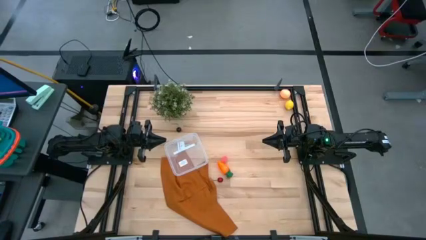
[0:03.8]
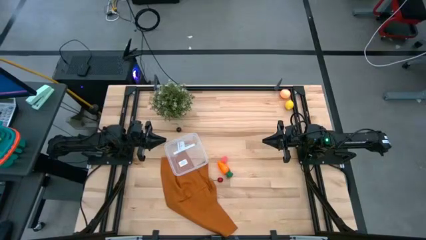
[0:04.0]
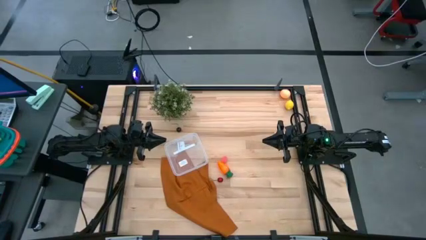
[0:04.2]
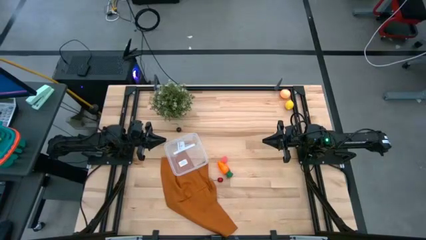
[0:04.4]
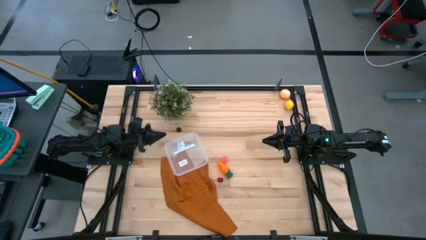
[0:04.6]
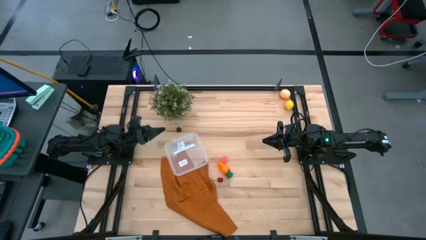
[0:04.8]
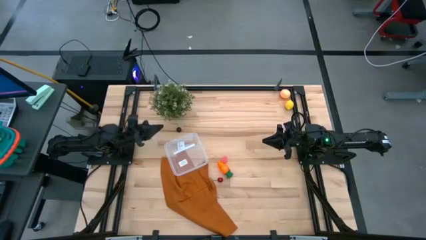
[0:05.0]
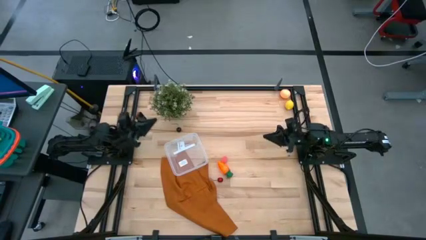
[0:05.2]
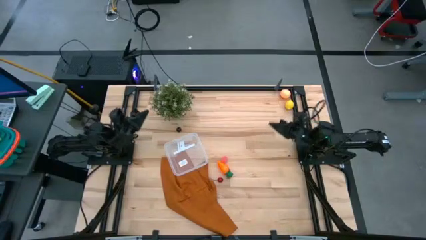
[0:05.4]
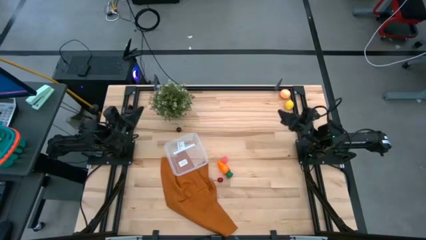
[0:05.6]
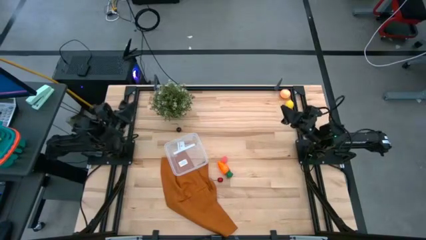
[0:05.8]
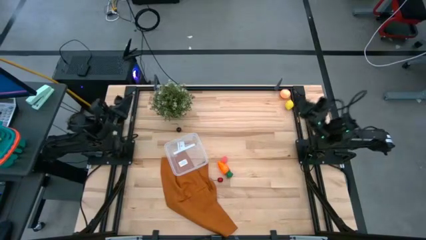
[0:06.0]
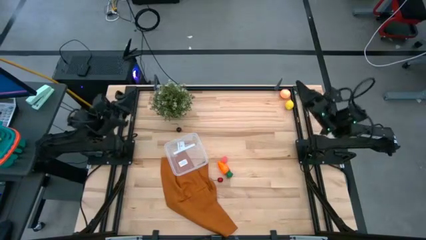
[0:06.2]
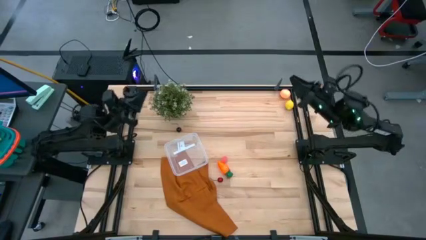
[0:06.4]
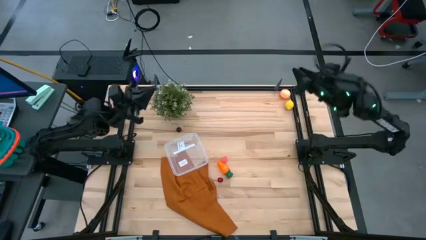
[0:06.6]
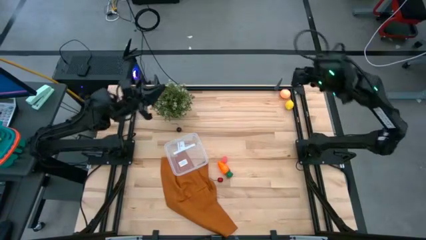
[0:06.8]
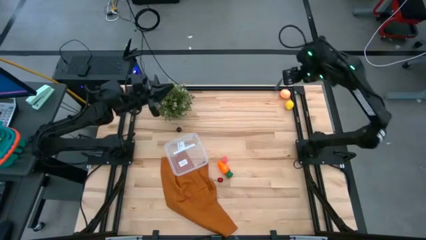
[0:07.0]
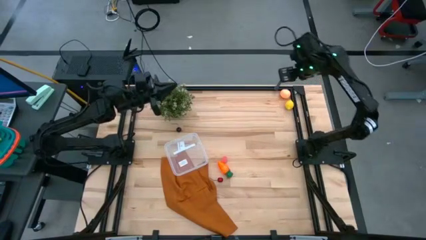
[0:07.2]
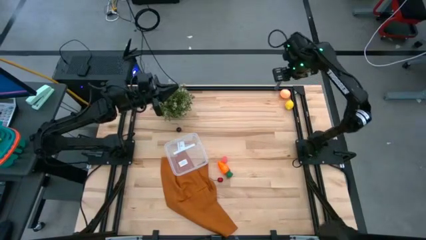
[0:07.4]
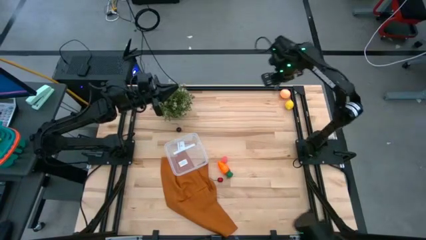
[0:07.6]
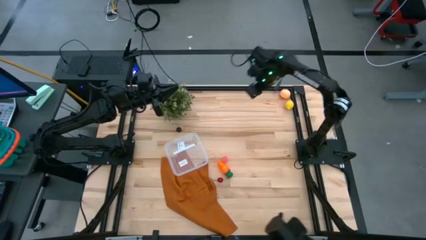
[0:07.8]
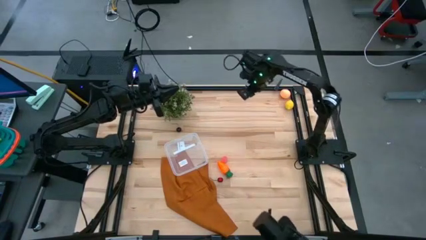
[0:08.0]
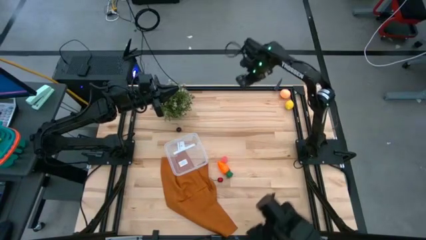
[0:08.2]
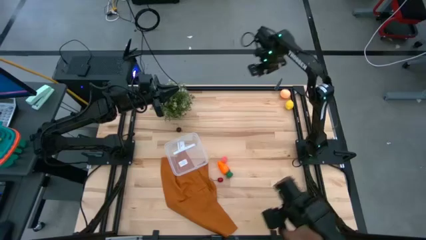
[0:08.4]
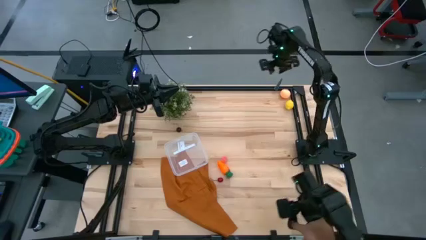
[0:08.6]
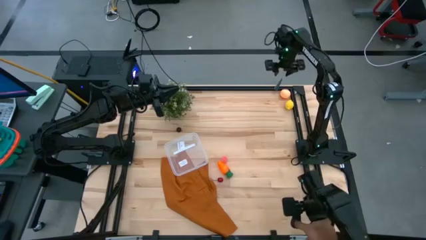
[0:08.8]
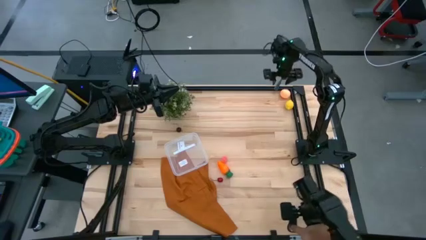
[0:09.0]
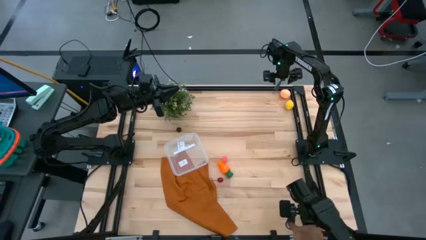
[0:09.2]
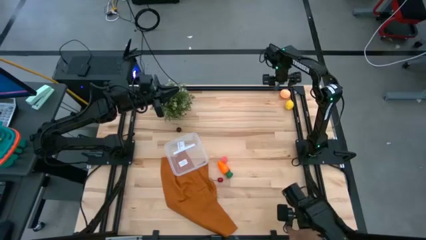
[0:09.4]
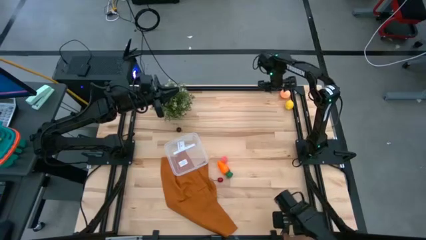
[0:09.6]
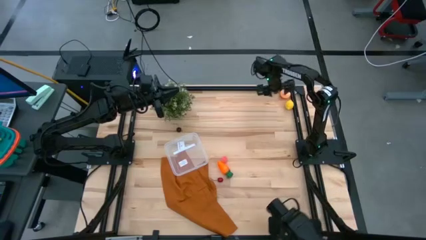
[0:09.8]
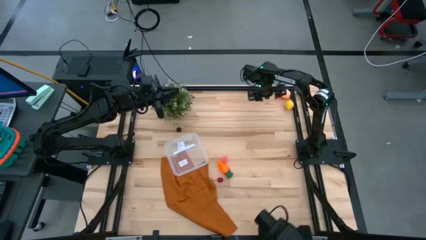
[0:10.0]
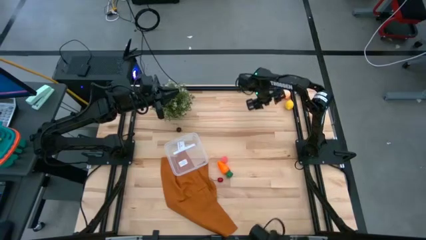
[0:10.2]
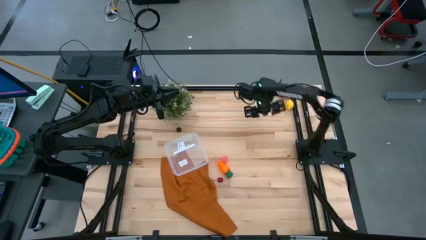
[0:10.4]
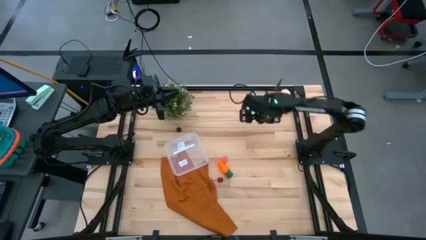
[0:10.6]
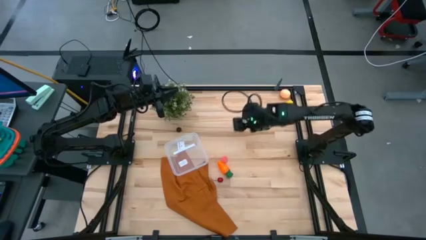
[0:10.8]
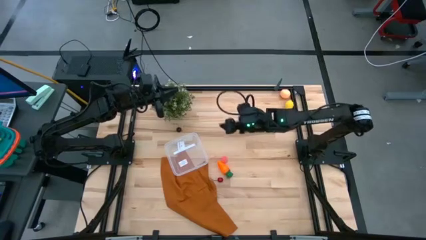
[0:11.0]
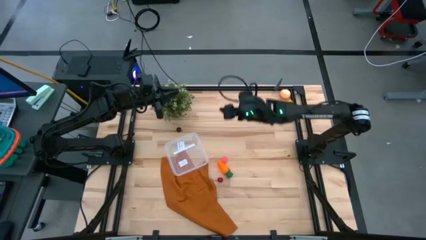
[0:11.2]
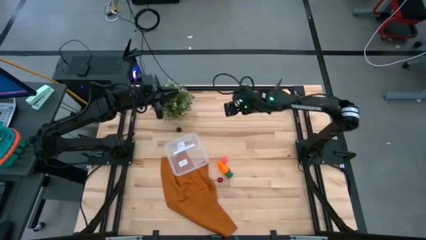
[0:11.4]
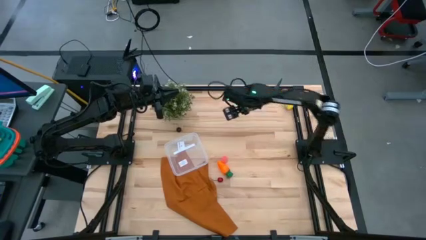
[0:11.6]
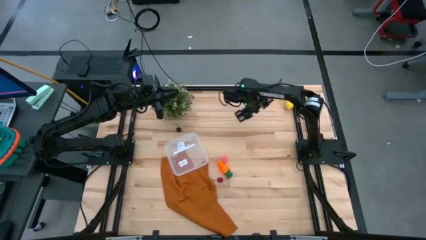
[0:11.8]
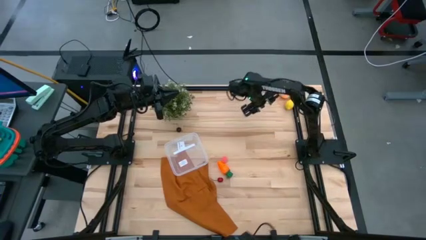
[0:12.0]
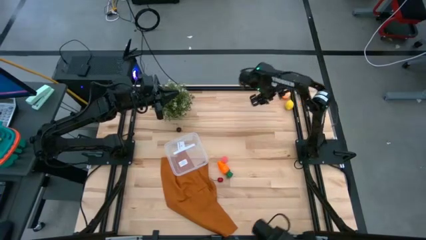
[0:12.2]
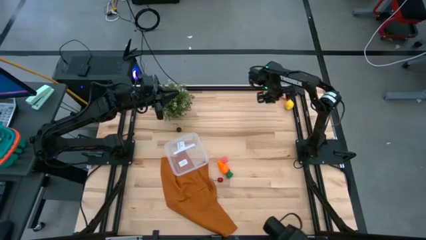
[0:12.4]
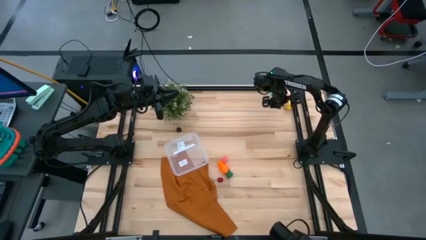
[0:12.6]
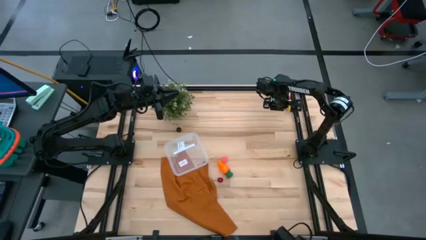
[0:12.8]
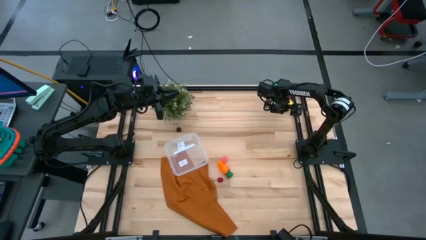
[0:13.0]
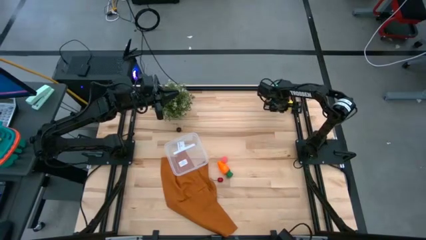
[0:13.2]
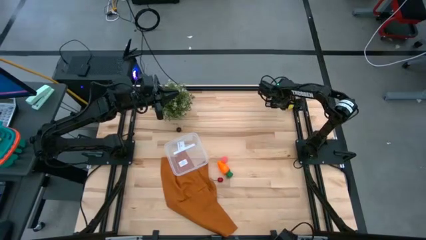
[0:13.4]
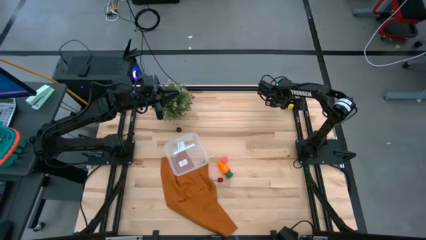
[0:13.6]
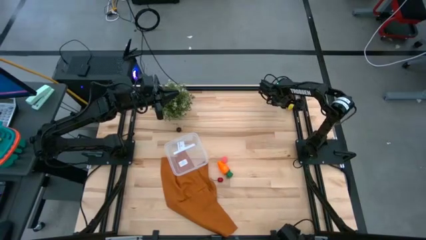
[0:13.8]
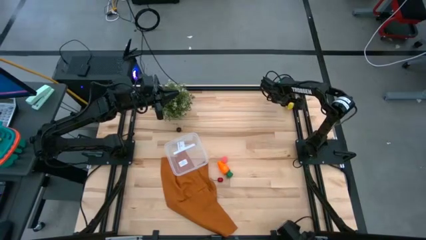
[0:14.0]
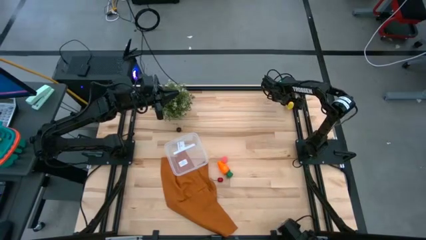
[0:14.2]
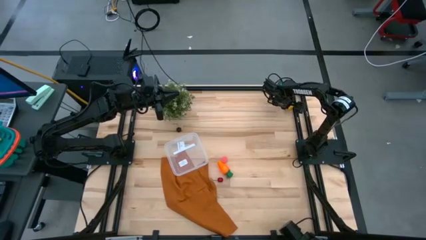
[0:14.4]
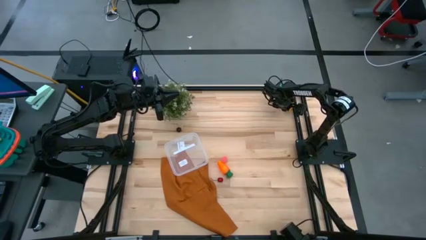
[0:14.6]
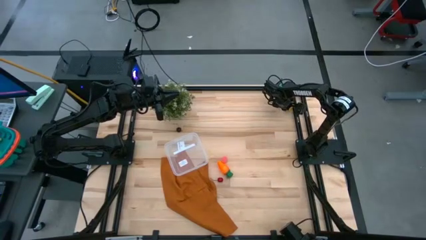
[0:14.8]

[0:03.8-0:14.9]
Task: Pick and placing Produce into tupperware
Put the yellow lemon into the bin
